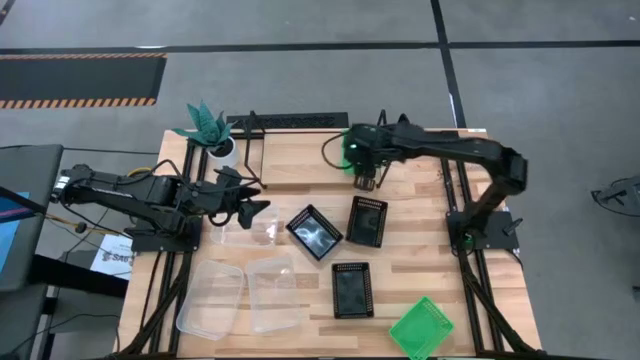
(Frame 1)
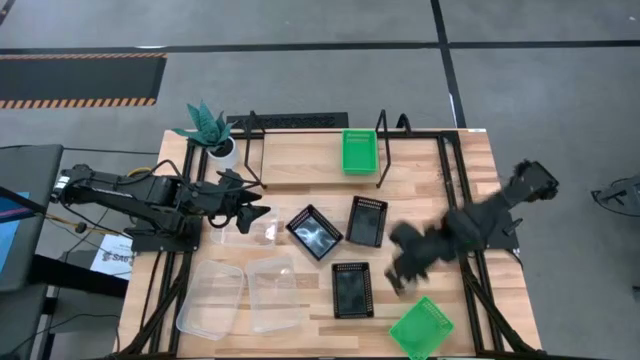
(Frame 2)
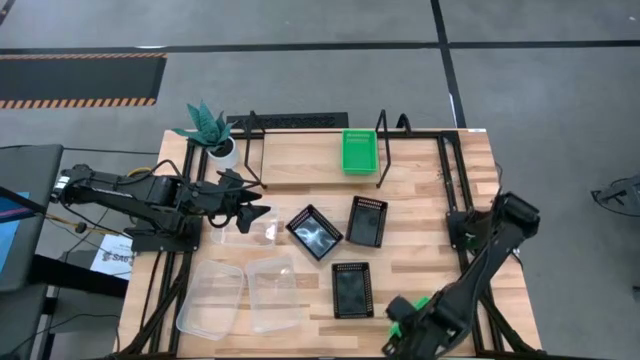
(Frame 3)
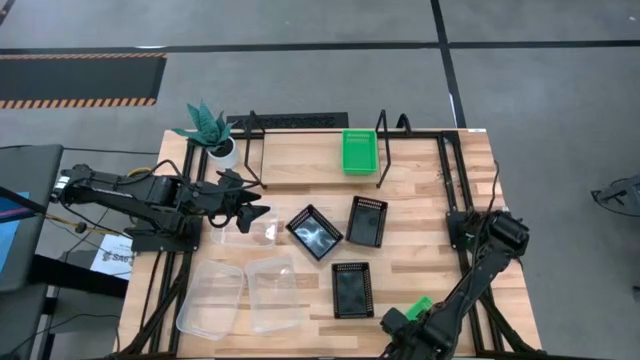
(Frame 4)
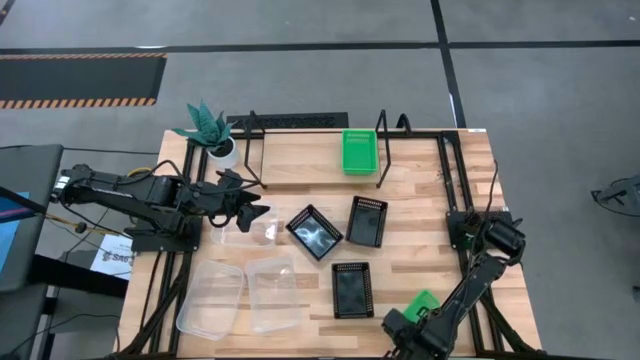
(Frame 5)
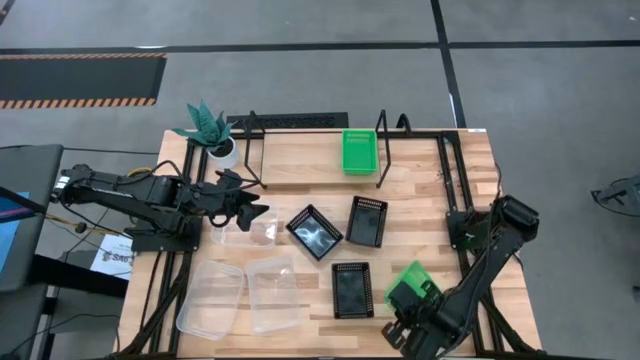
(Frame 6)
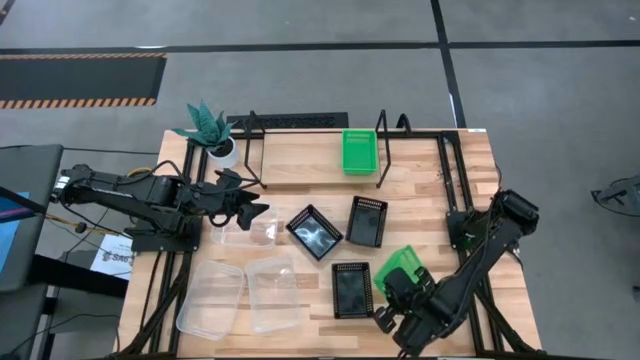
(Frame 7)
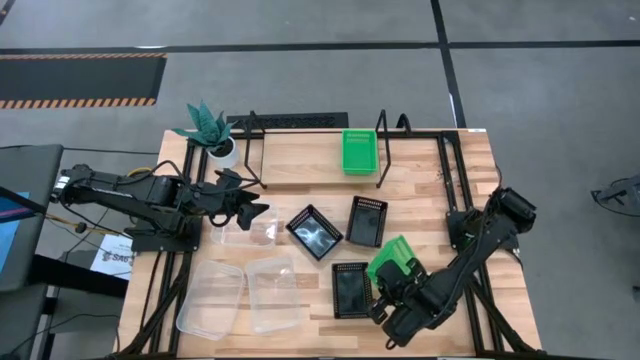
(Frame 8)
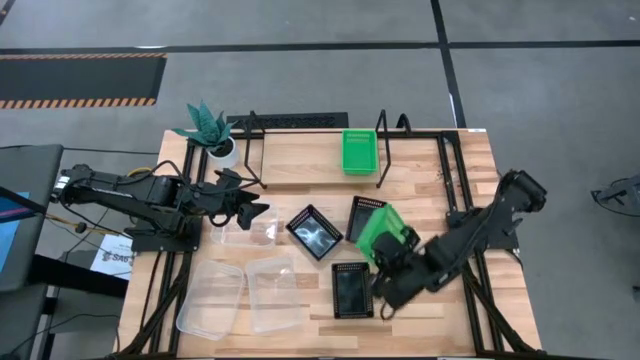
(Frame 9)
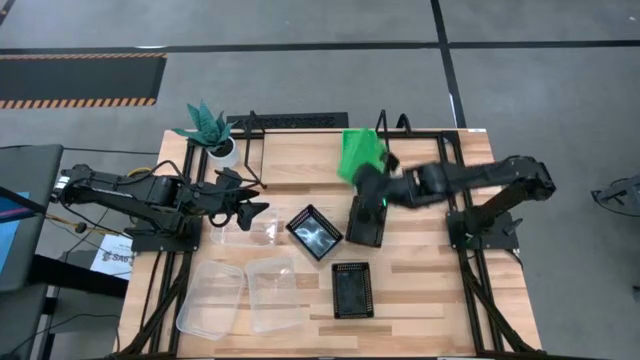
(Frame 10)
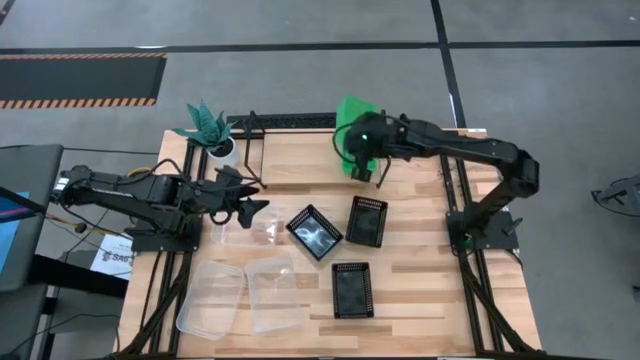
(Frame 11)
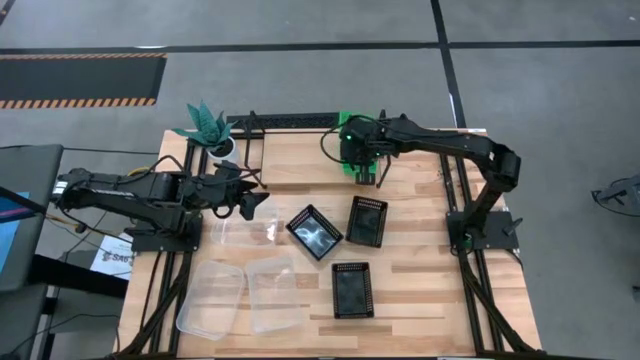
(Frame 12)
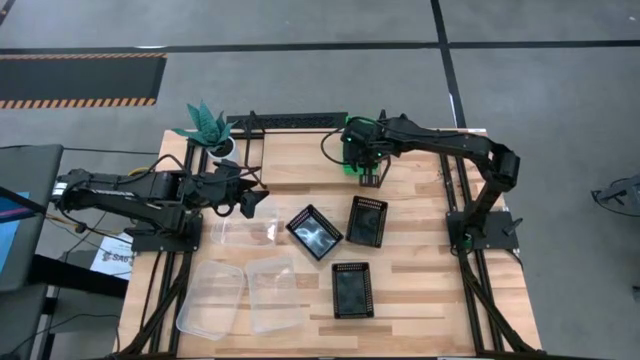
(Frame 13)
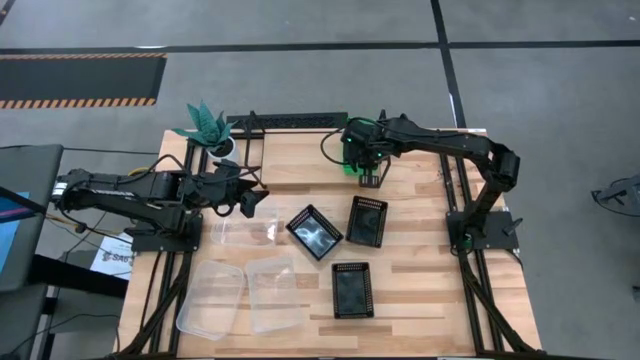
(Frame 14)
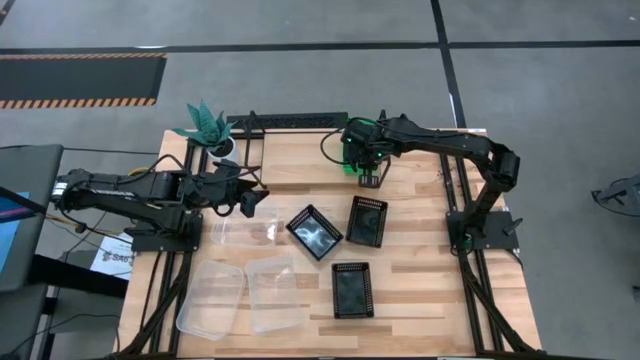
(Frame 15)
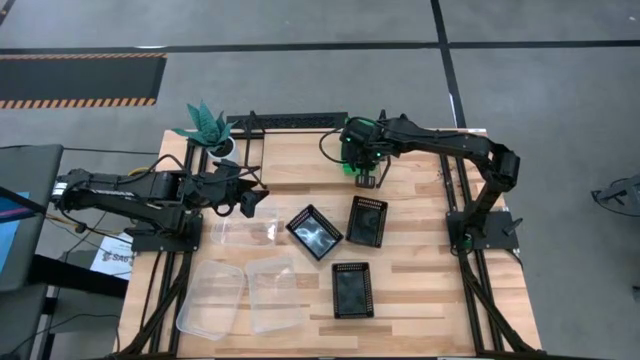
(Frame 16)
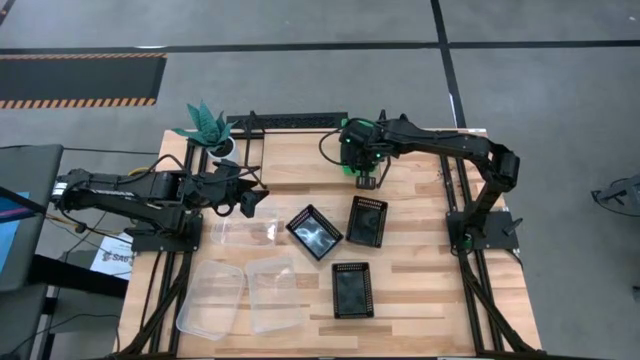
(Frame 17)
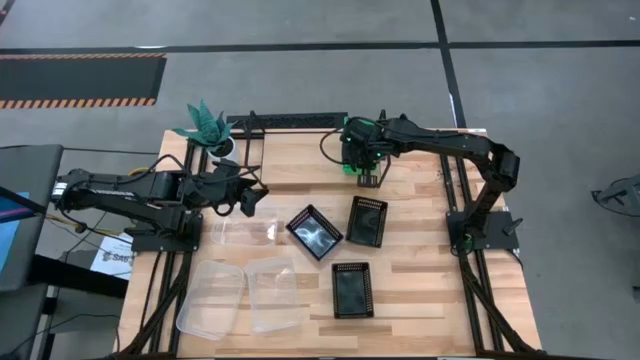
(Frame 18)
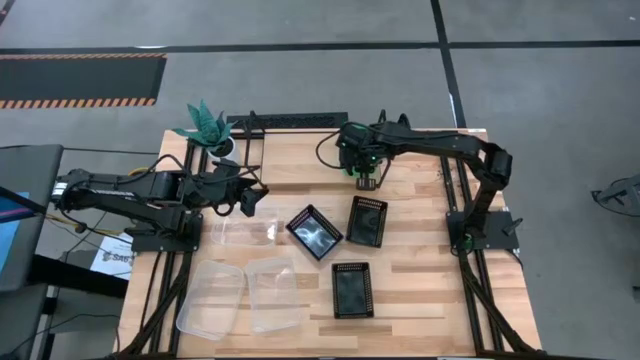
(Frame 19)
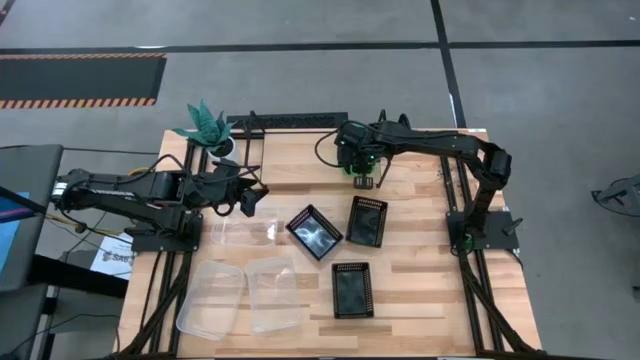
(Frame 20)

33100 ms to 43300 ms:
Task: Stack baskets on shelf by color
Stack the green bin on top of the stacked green bins on the shelf

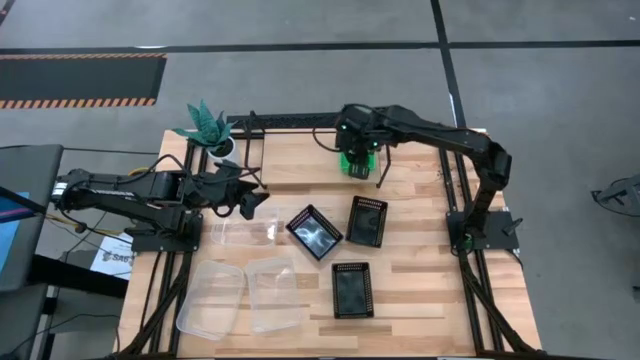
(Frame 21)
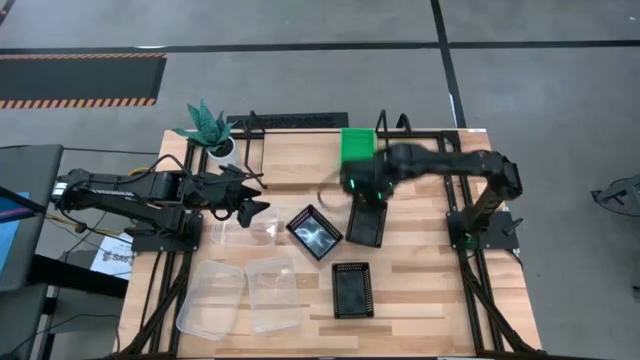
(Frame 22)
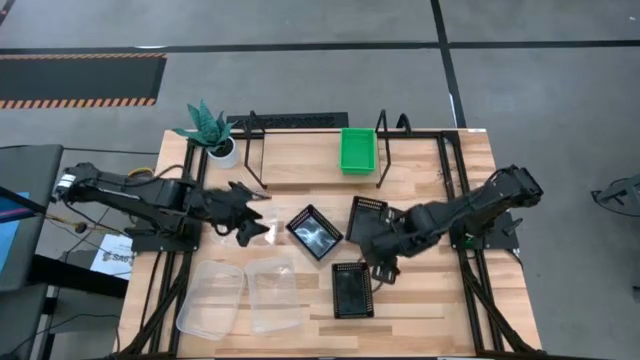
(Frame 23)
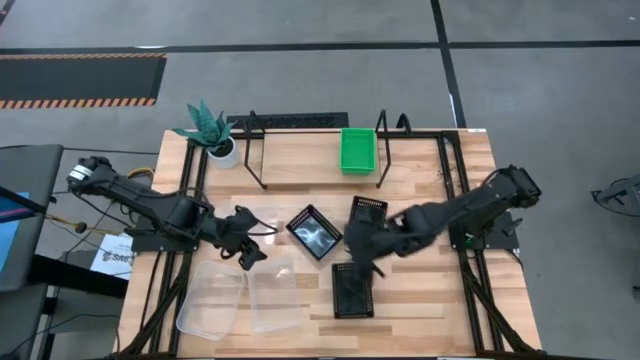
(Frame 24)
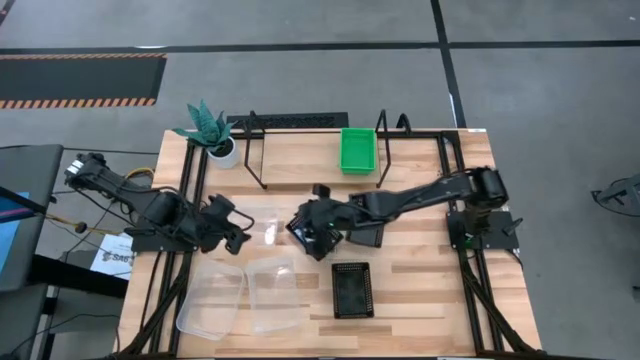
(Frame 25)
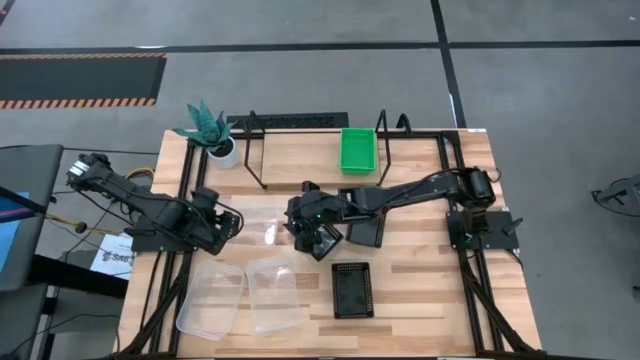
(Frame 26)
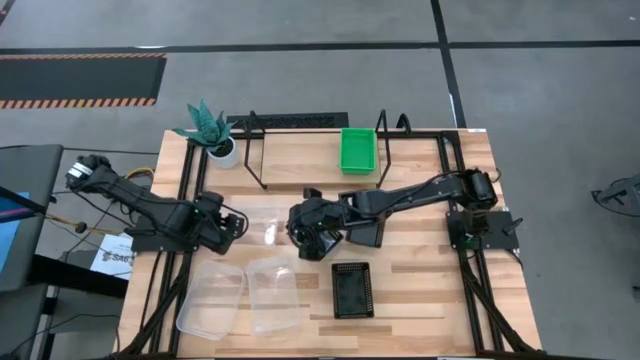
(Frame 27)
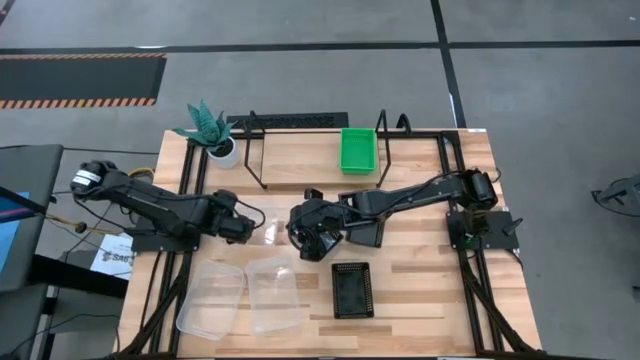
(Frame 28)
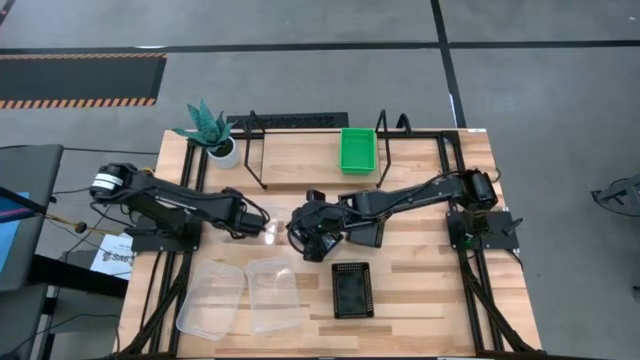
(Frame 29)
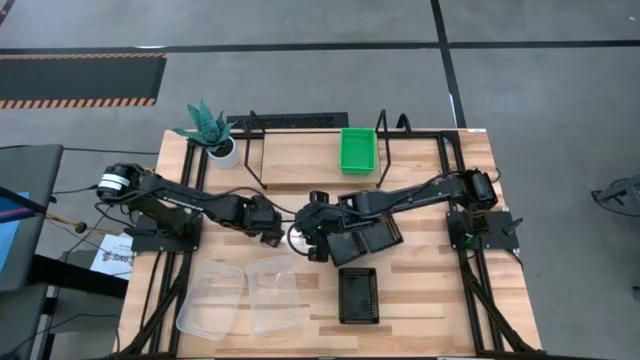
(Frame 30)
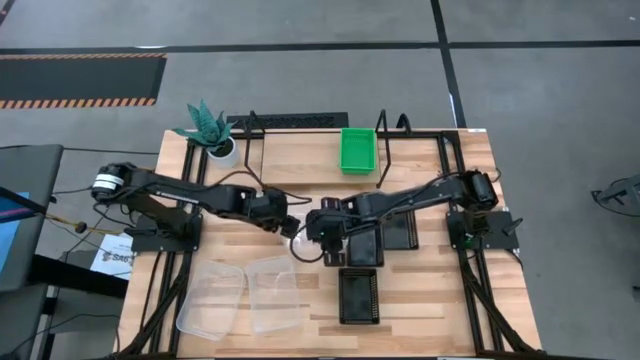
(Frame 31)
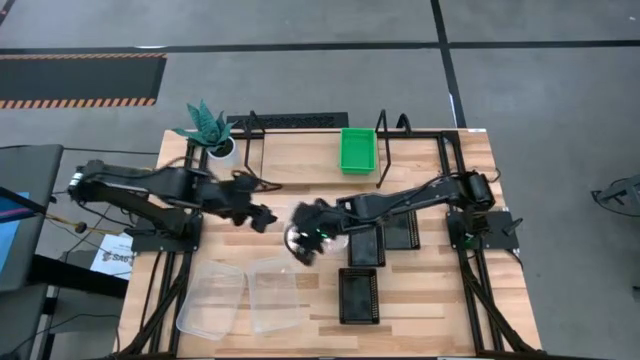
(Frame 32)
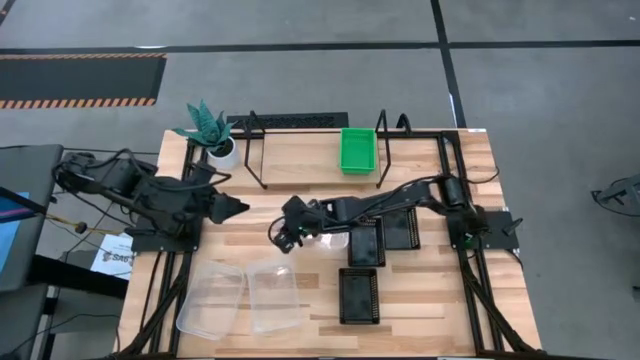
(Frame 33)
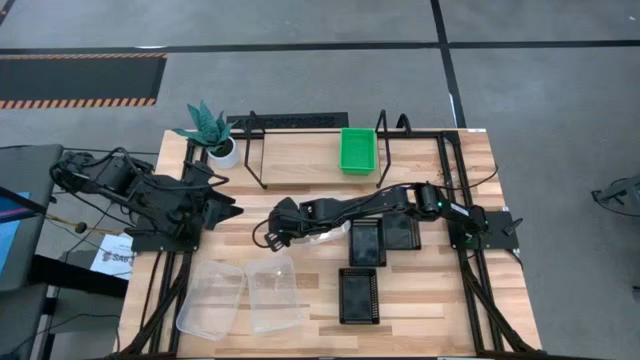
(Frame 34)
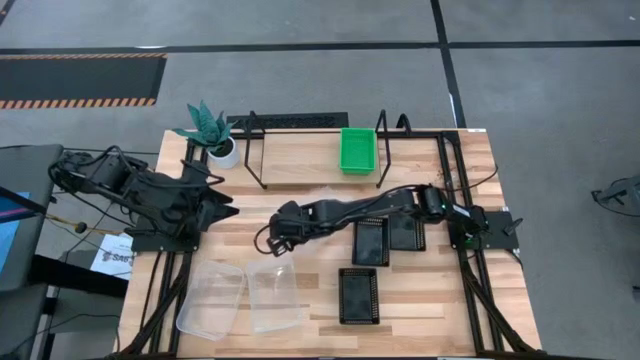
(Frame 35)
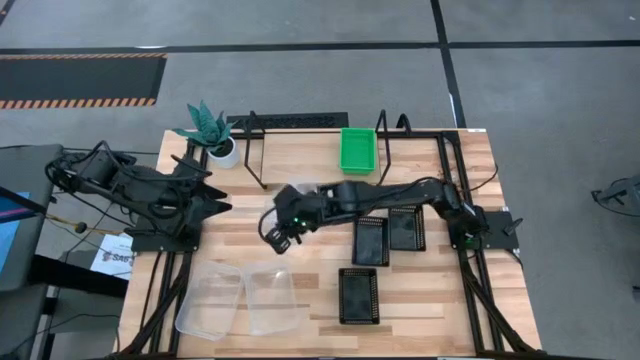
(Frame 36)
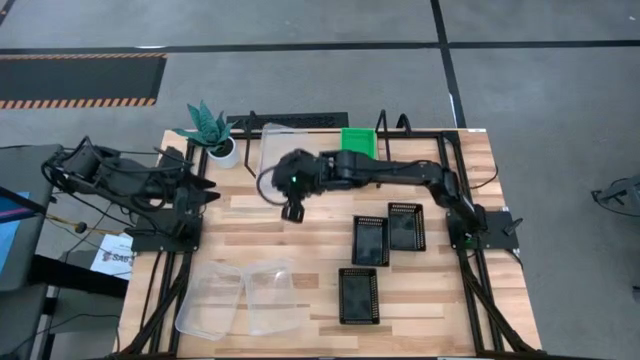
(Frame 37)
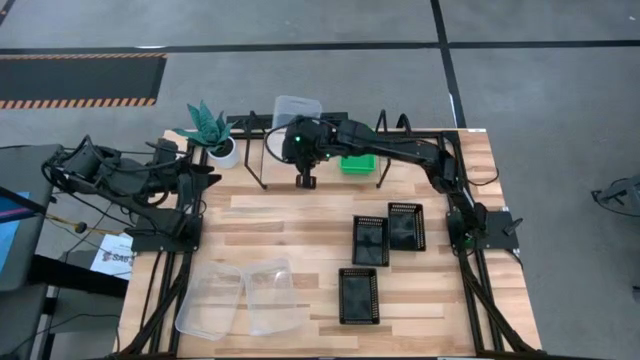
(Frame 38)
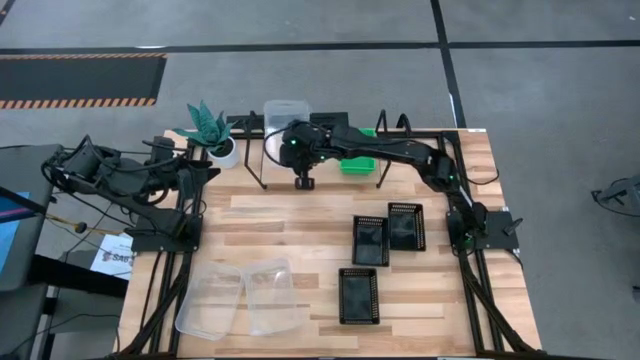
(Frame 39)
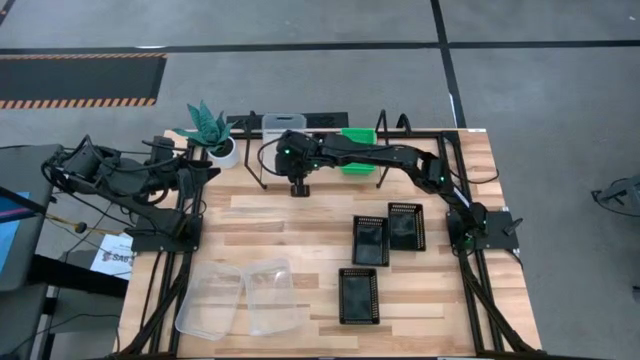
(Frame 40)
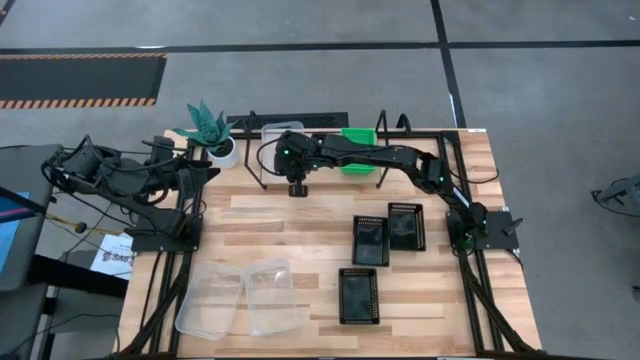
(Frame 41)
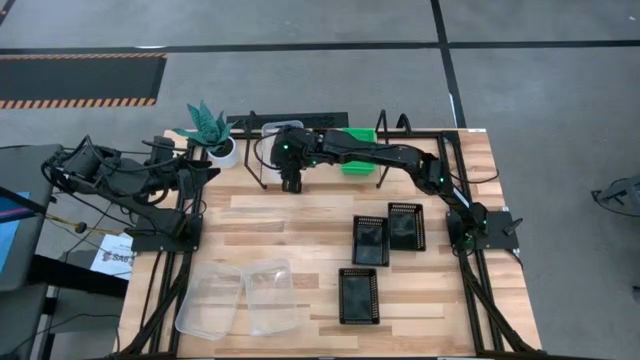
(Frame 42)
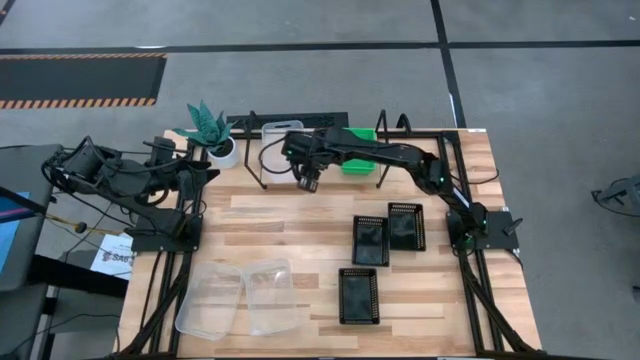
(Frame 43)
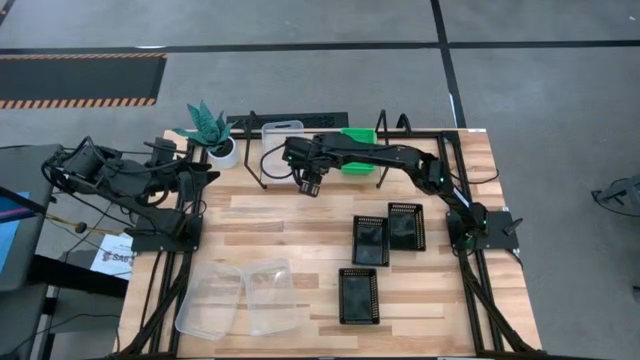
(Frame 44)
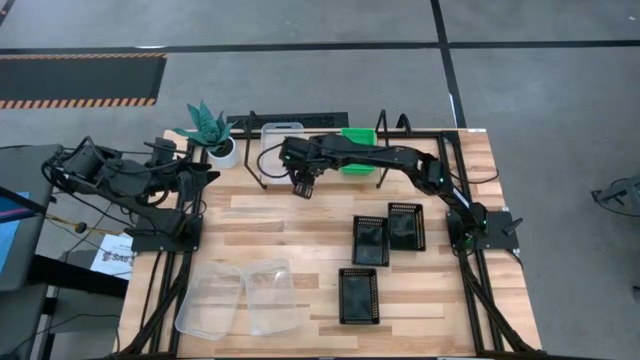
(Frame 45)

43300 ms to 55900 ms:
Put the top transparent bin on the shelf
